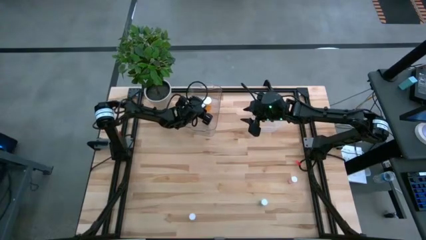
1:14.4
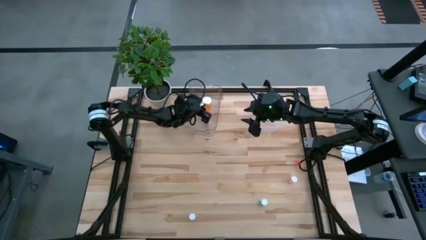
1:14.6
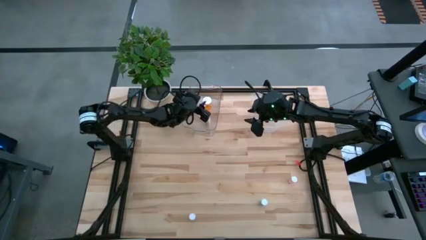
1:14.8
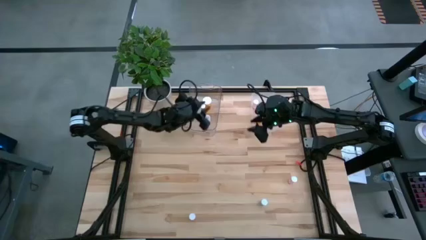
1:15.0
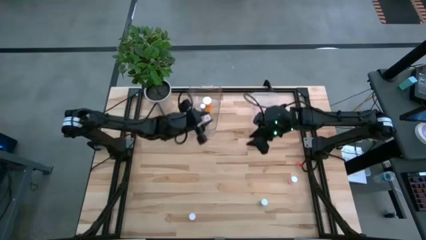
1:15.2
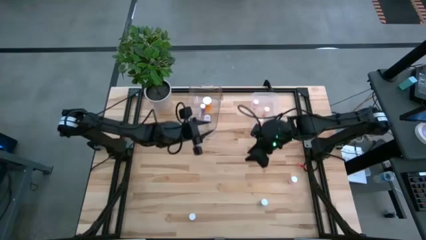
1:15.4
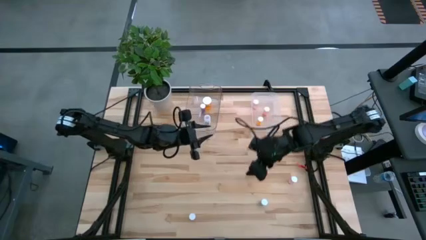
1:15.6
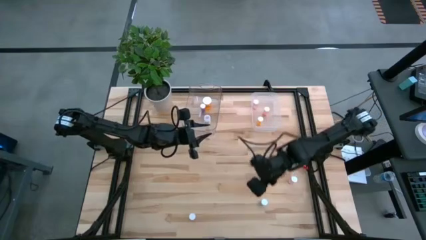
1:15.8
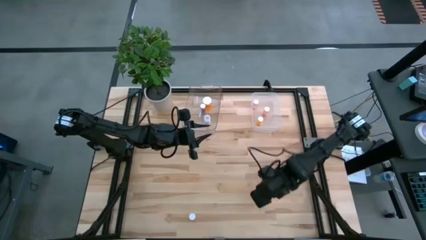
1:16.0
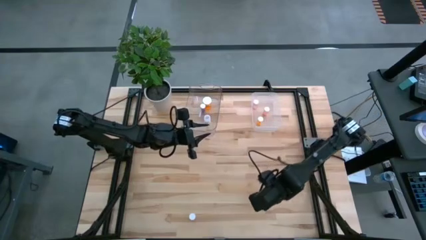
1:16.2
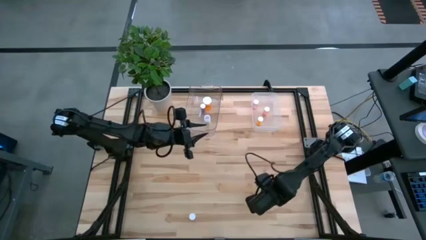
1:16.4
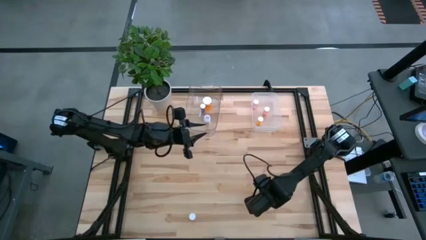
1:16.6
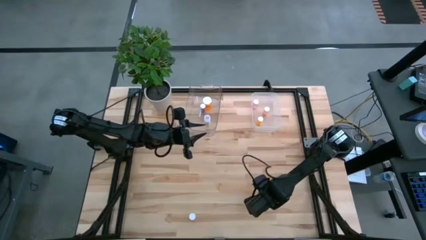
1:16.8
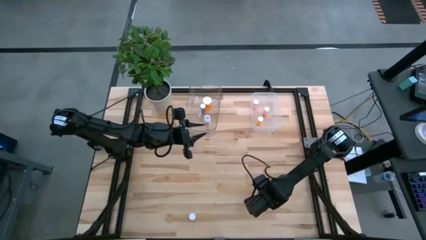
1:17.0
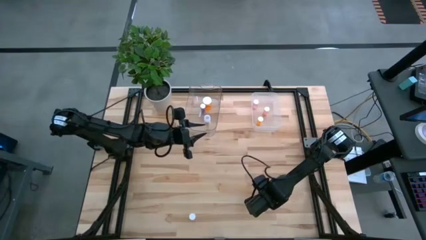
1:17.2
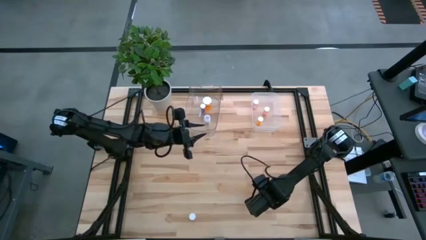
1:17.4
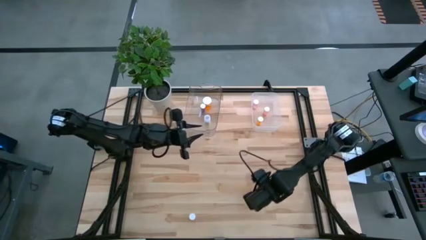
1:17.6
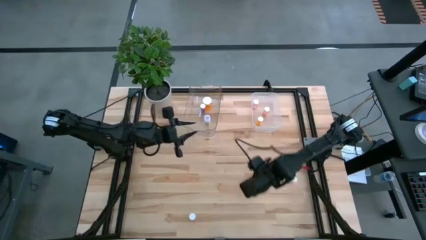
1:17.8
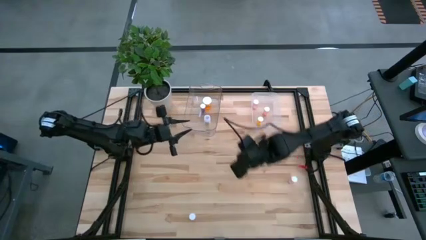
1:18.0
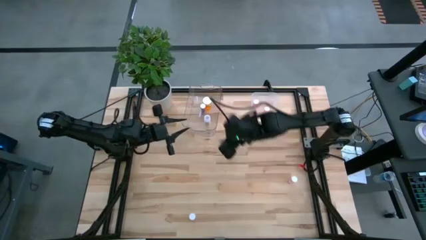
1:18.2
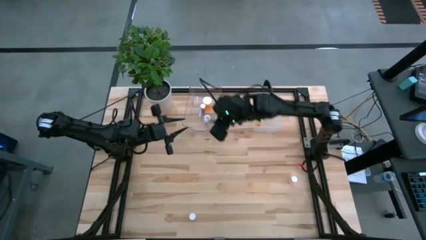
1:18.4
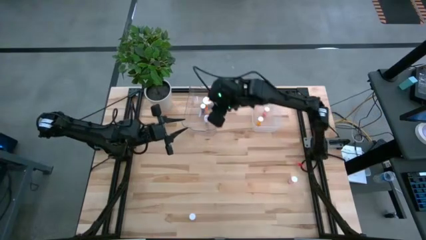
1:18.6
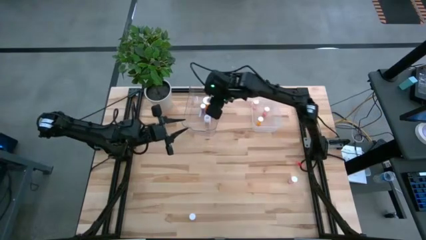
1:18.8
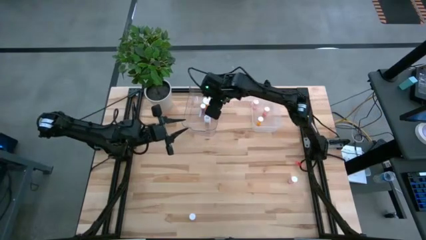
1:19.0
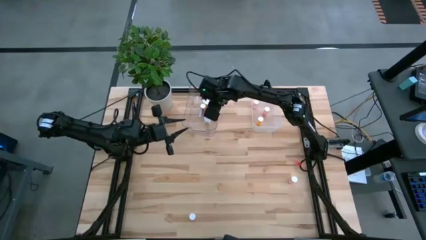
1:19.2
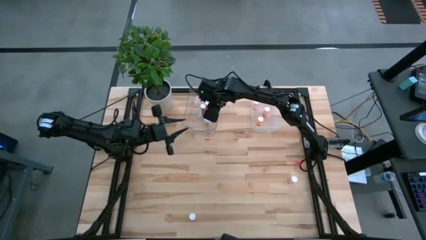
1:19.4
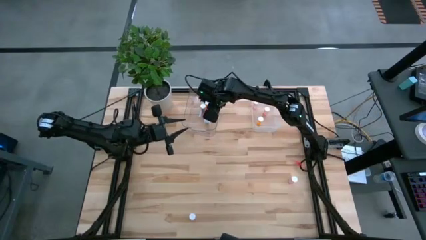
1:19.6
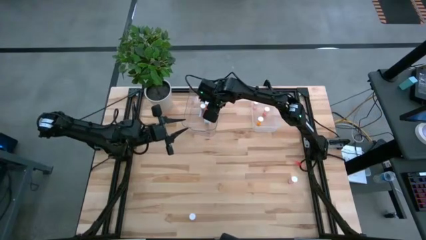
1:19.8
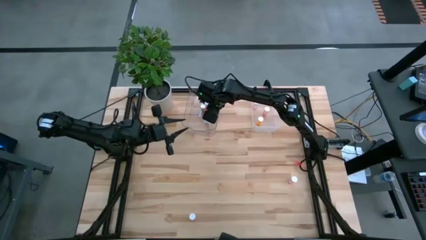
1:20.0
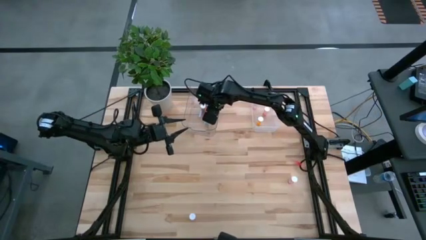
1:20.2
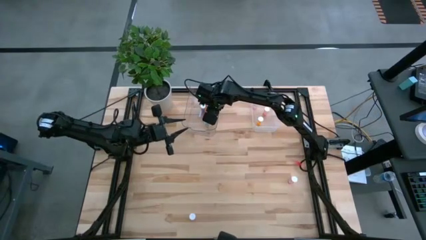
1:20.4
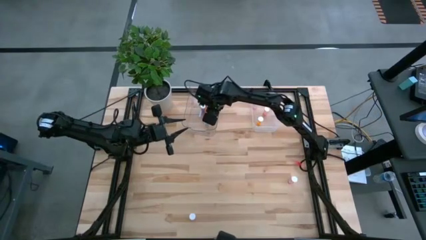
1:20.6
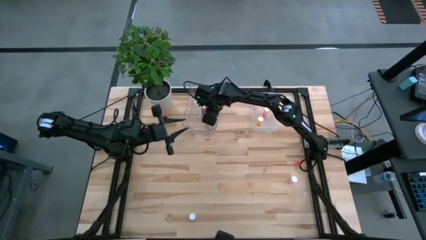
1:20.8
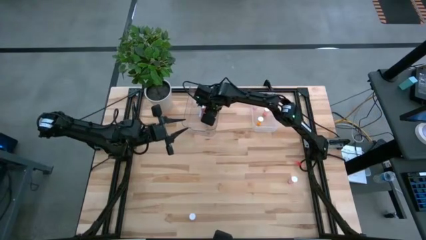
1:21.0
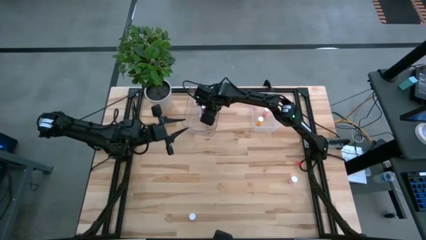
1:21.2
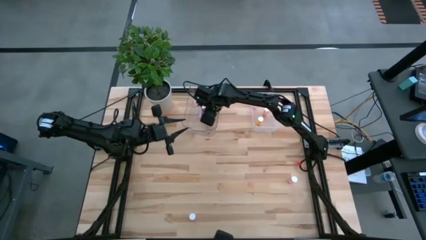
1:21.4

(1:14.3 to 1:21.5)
Task: Pick and place medicine bottles into bin by pill shape (circle, oval)
Put the blue capsule pill bottle into the left transparent bin

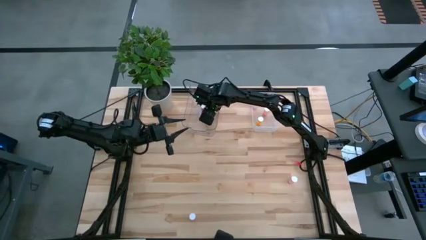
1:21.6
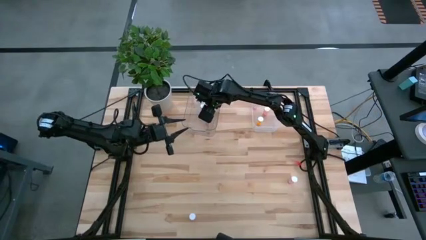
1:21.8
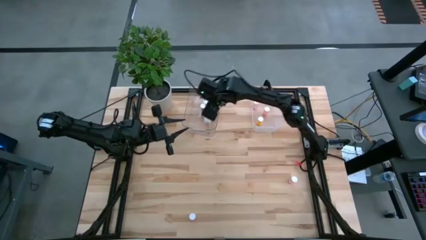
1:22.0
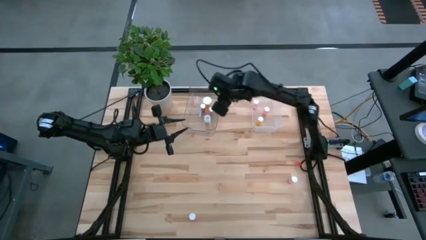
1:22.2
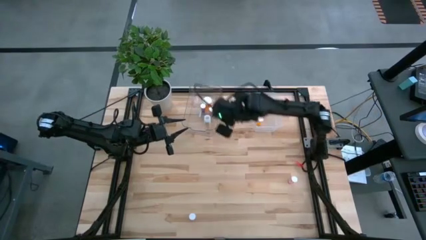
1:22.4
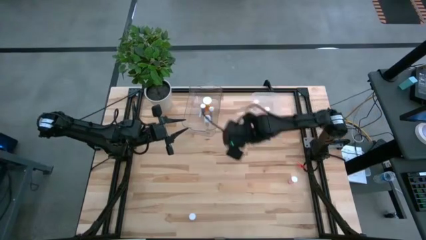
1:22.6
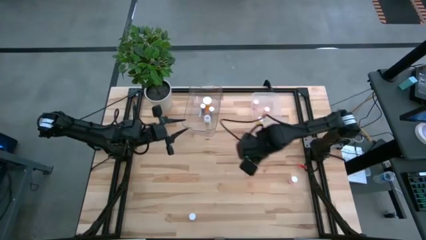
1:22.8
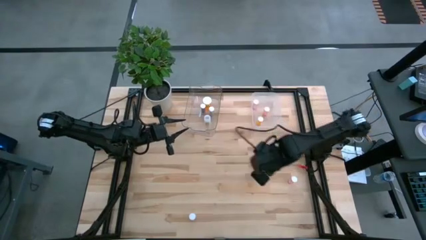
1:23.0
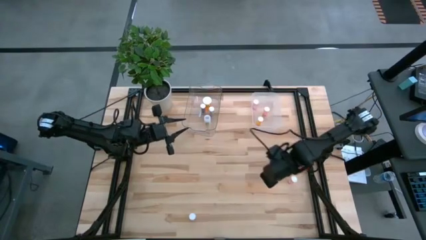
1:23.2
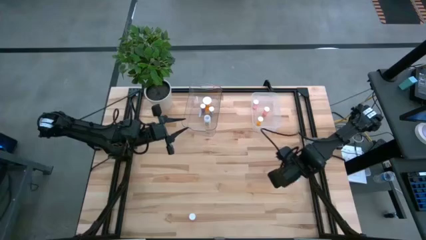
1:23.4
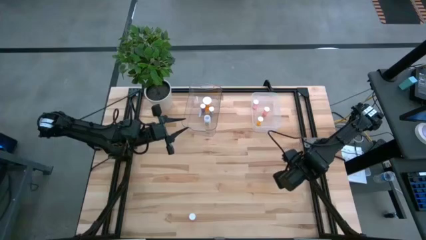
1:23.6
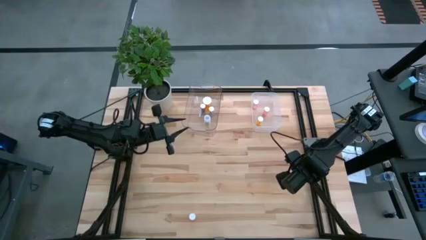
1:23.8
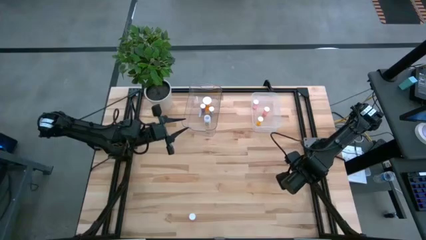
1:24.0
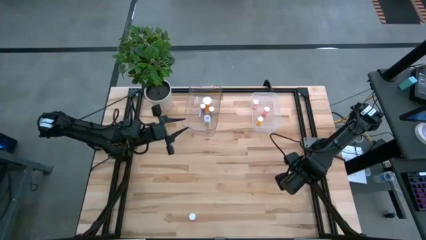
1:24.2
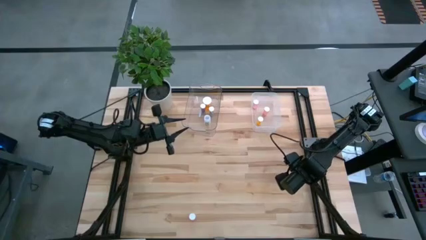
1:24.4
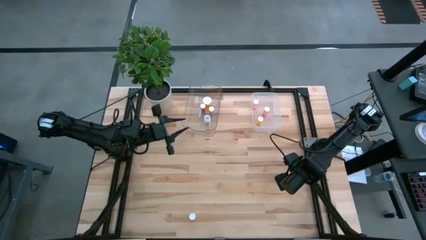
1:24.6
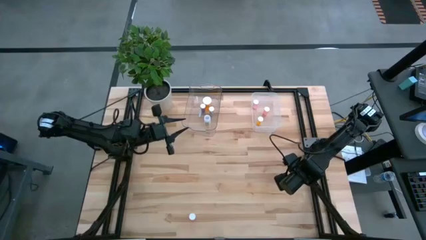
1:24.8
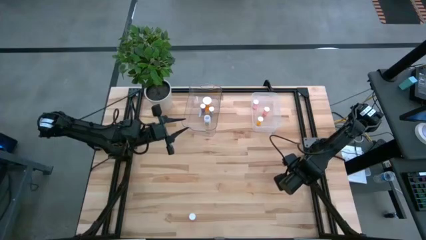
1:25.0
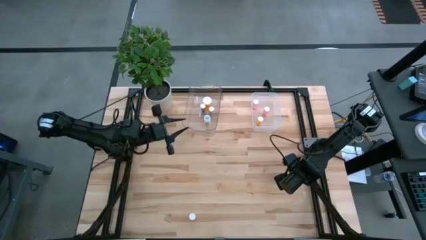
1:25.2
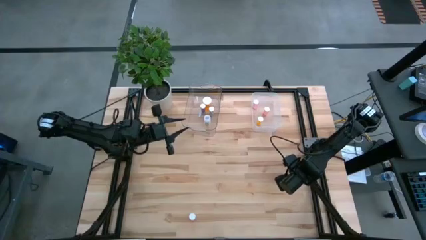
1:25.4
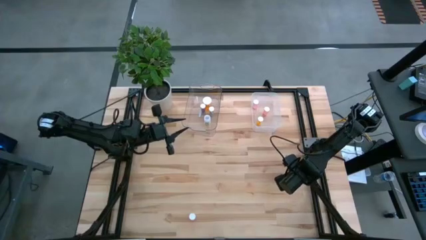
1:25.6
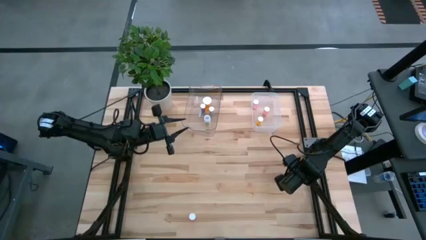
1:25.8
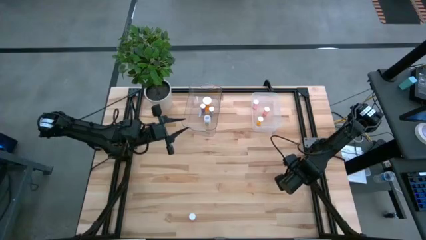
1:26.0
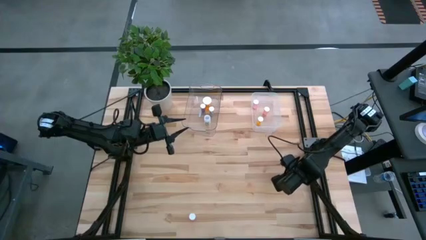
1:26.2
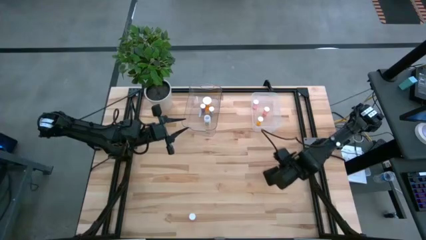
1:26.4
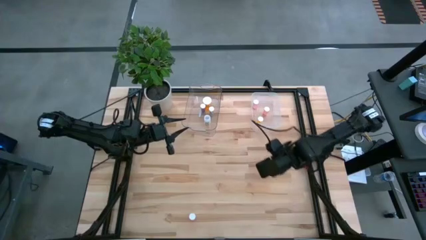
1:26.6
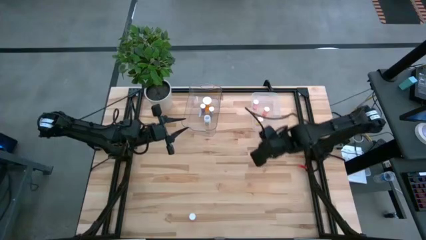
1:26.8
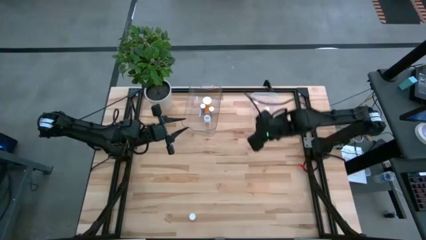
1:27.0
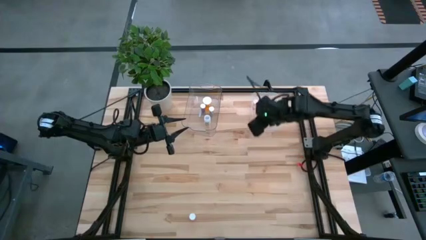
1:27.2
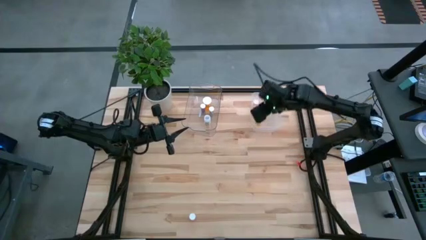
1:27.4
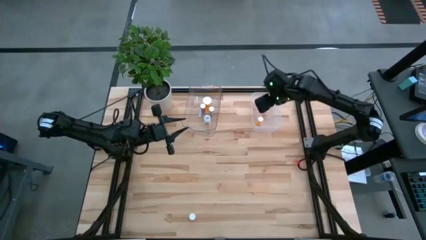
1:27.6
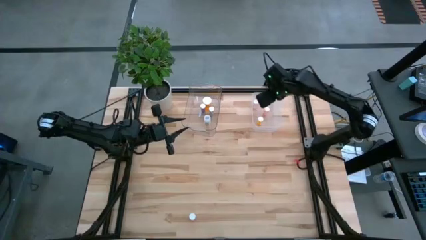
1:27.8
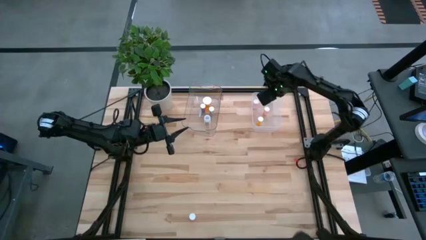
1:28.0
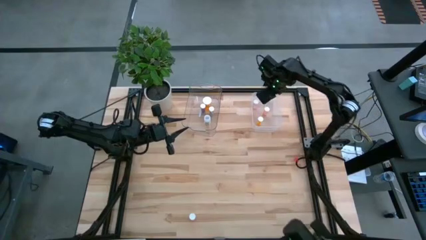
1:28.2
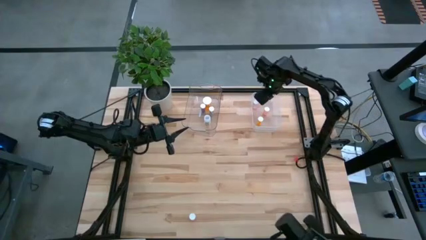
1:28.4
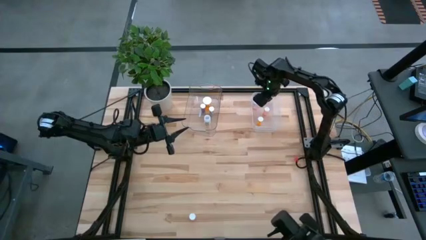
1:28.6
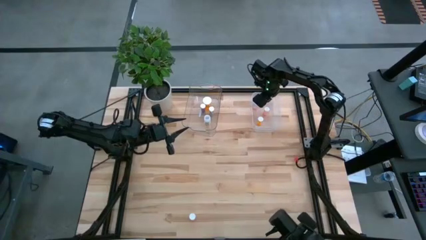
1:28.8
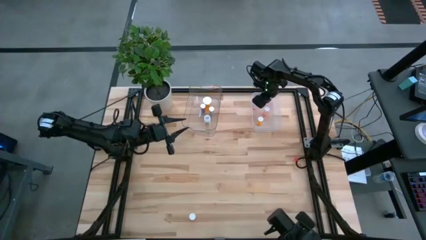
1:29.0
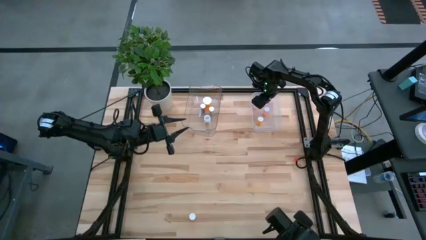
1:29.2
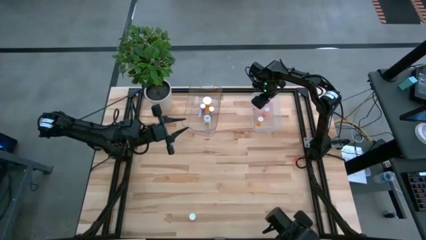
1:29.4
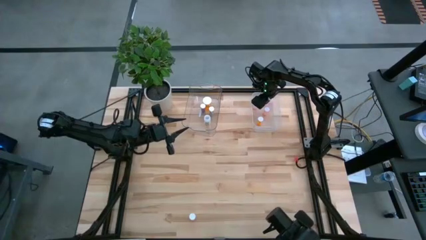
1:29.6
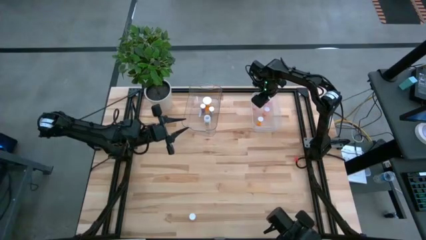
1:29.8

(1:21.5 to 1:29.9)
Put the pink tablet pill bottle into the right transparent bin

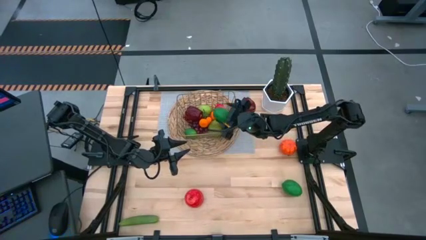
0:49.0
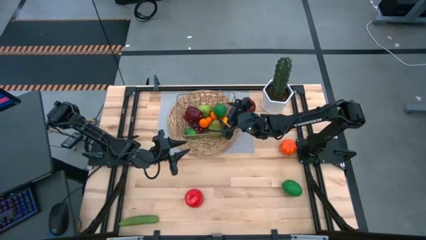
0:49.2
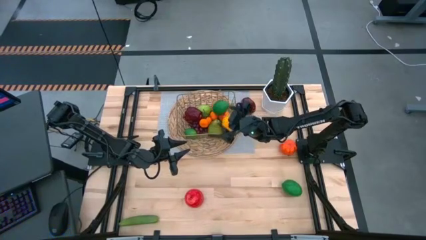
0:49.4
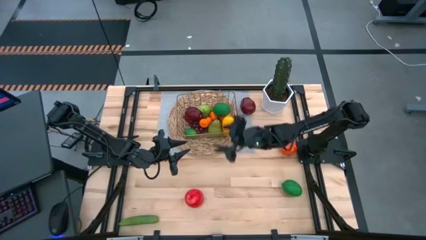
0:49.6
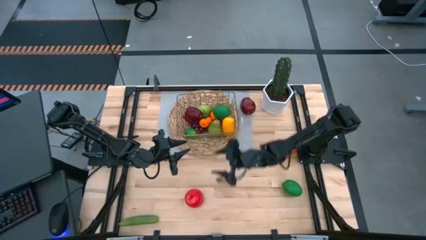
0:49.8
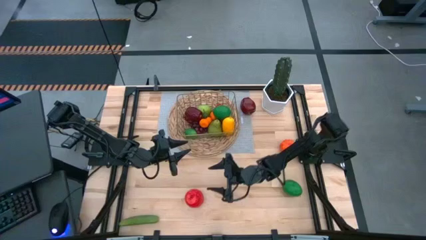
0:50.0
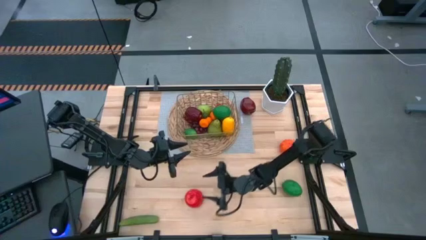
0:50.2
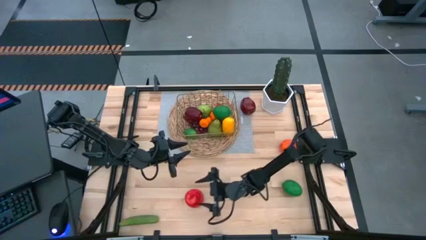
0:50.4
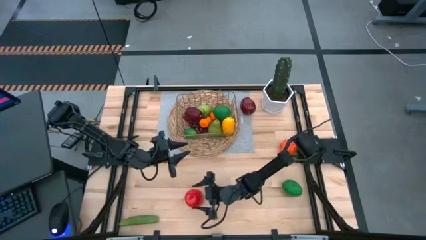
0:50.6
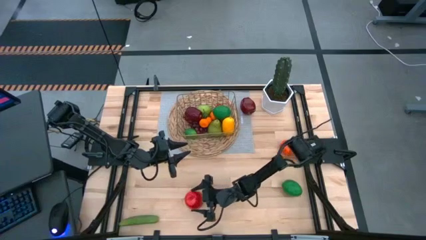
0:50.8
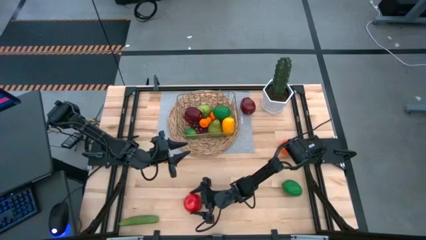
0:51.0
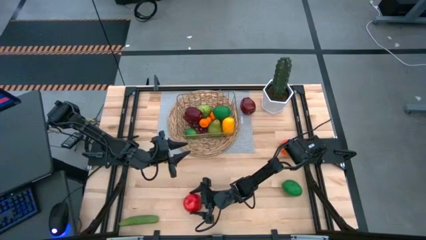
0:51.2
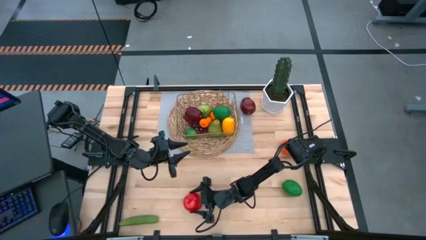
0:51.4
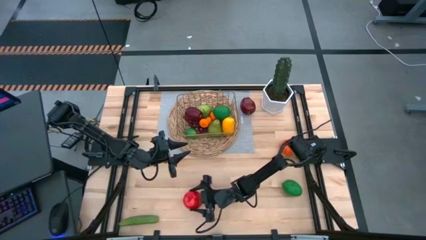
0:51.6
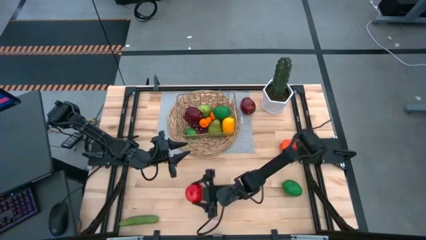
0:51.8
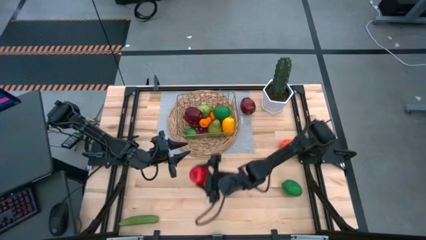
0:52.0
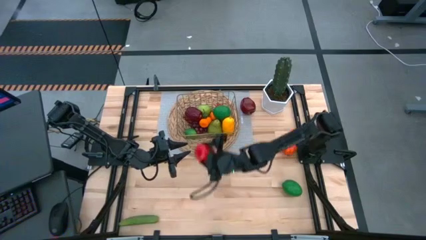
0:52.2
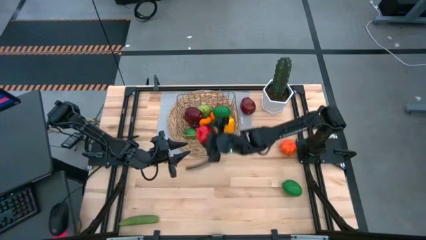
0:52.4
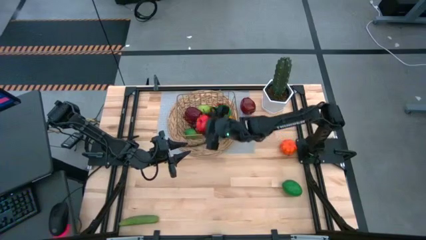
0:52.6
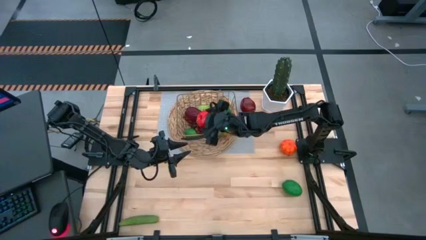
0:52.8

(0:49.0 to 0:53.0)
Task: Build produce basket
Put the red apple into the gold wire basket
